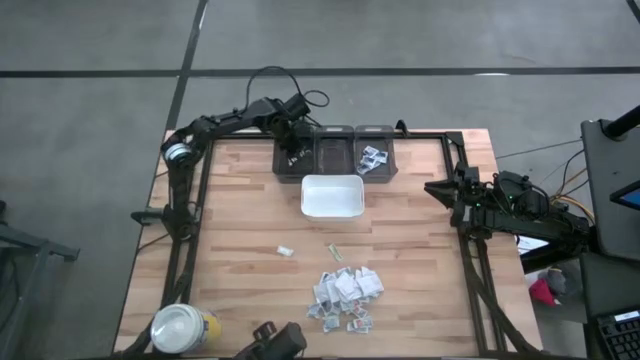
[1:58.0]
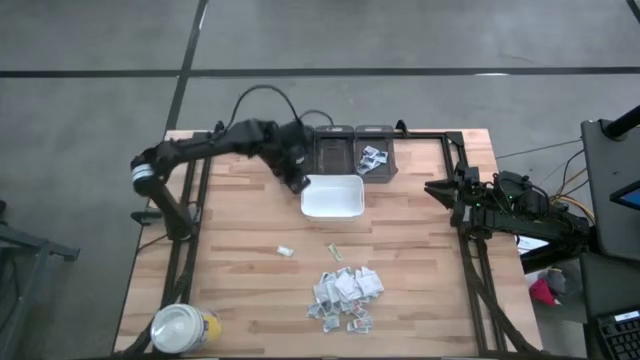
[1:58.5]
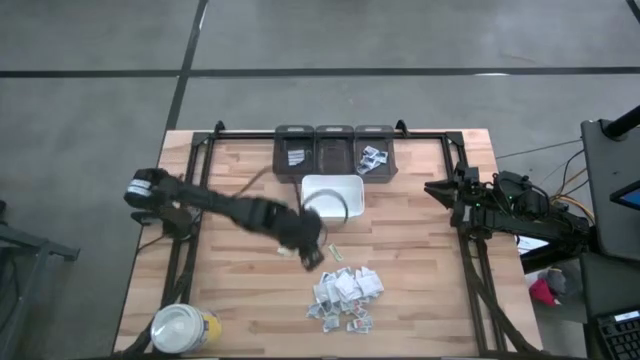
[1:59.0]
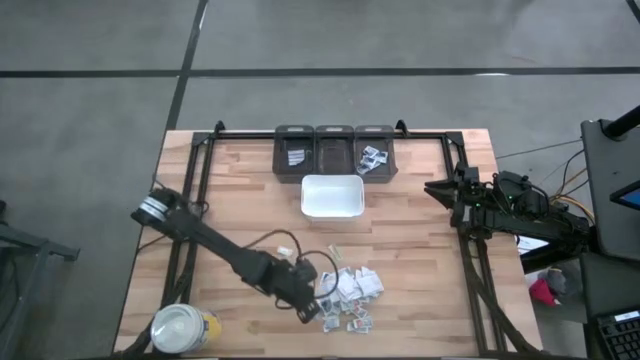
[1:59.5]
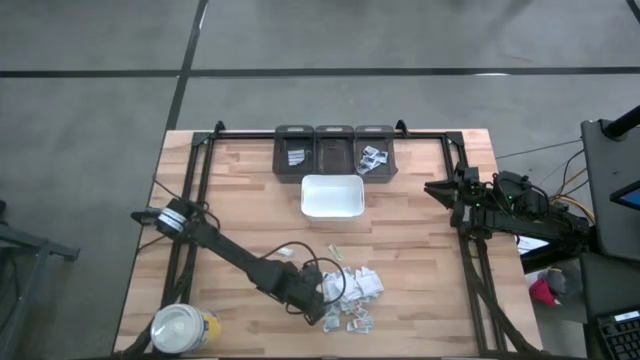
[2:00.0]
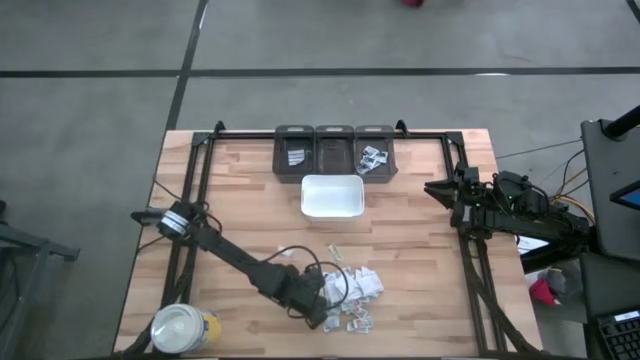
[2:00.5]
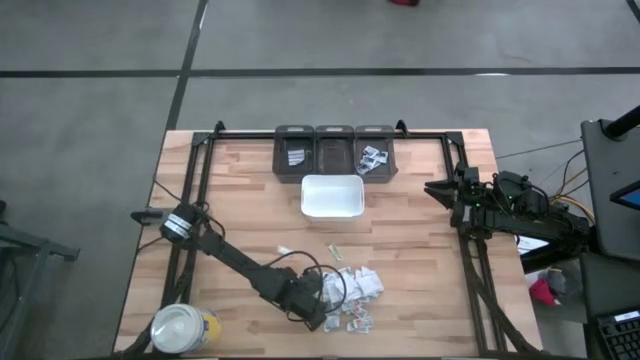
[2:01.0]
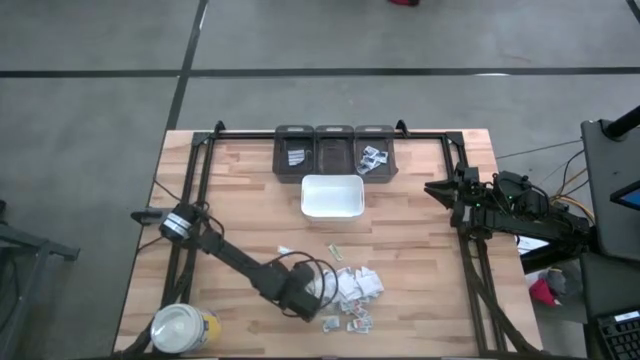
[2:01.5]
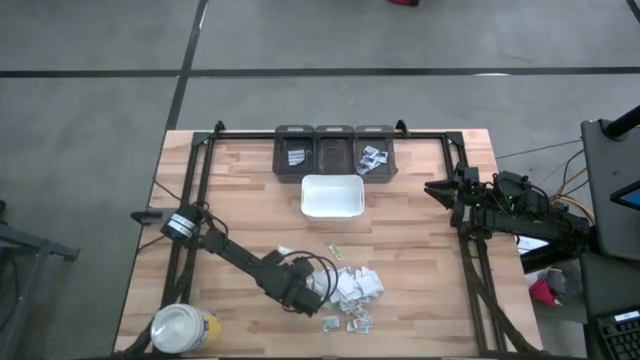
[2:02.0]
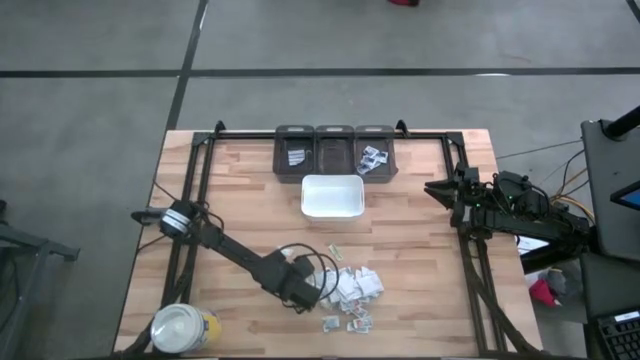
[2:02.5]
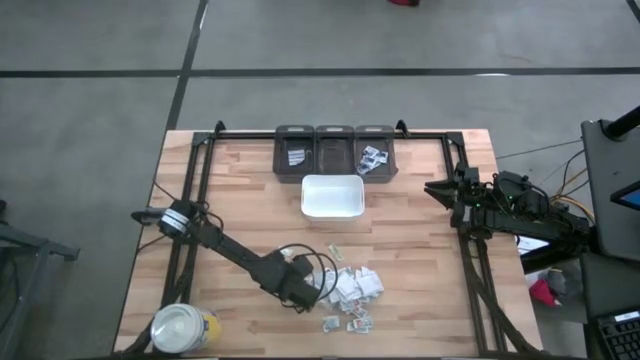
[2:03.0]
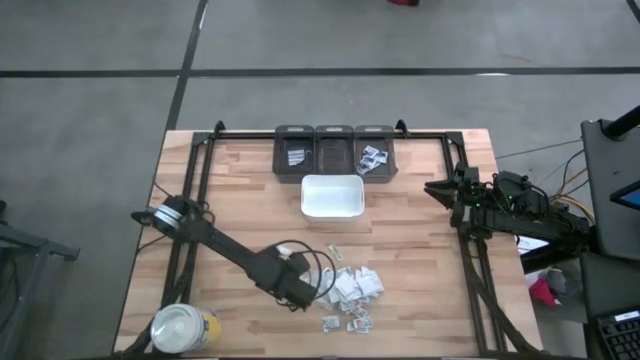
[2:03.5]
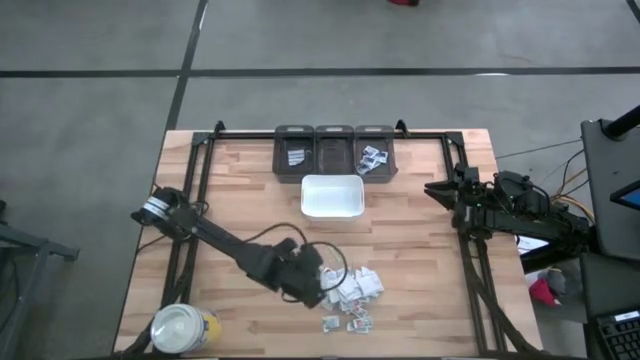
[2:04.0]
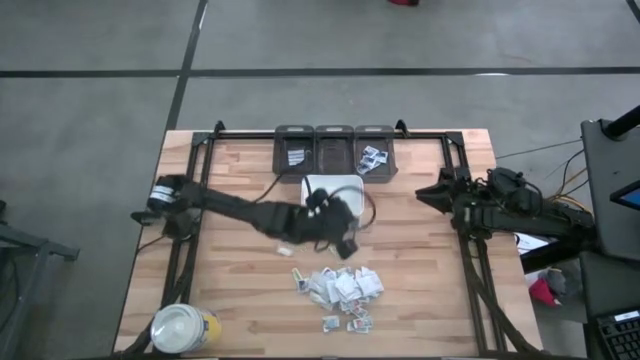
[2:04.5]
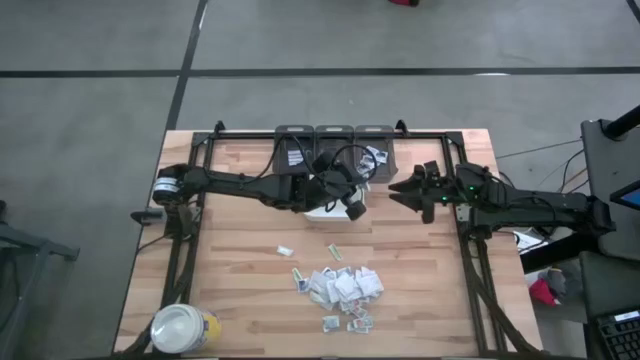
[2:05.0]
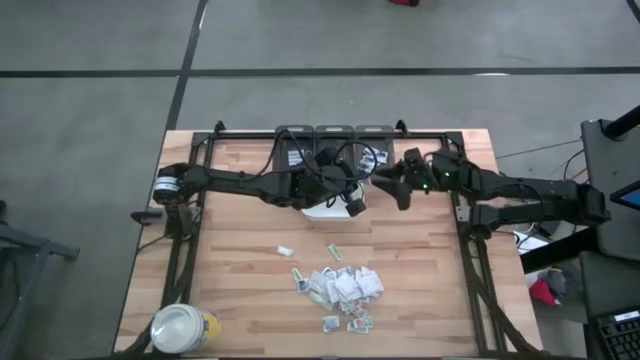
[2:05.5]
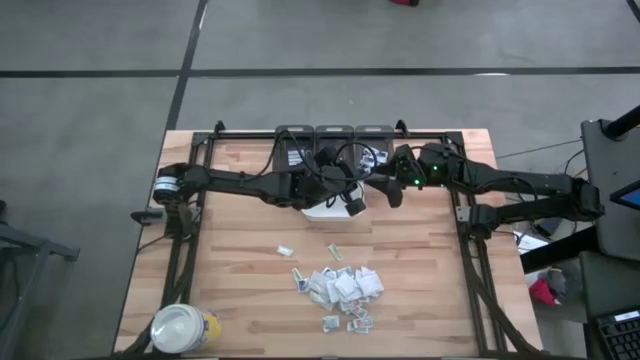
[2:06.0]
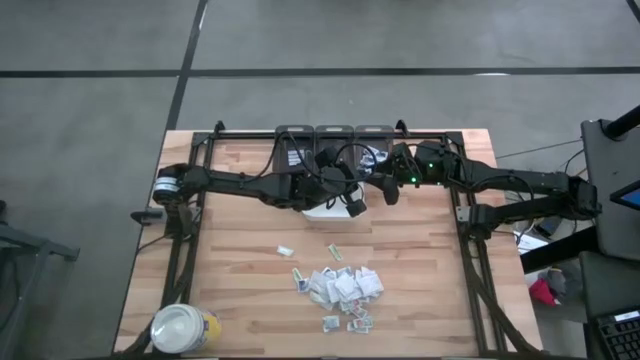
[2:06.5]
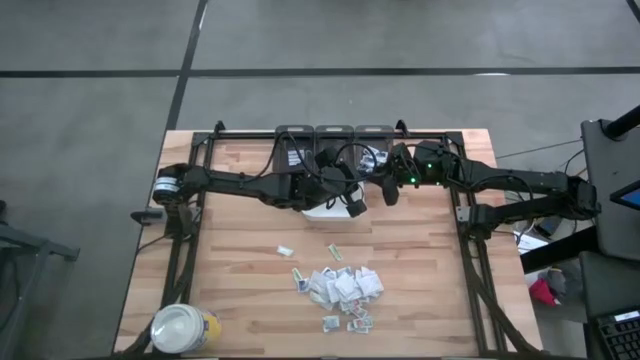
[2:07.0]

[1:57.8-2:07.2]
Task: Pick & Place First Aid Supplies
Put the white alcohol pad into the right black bin

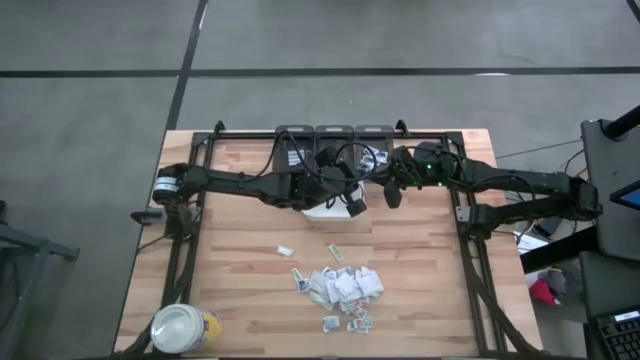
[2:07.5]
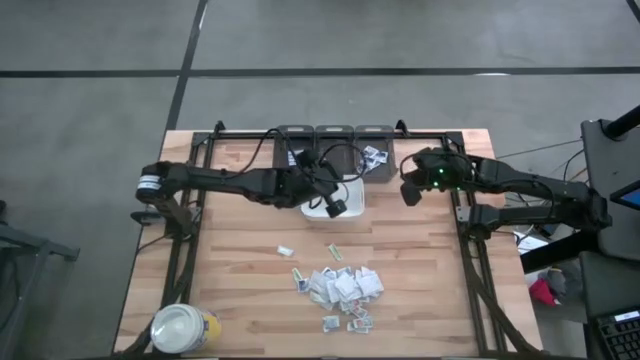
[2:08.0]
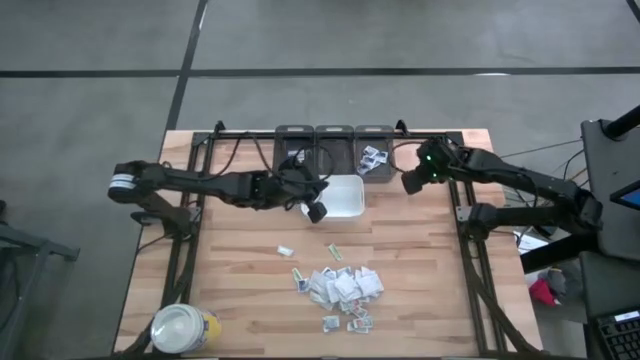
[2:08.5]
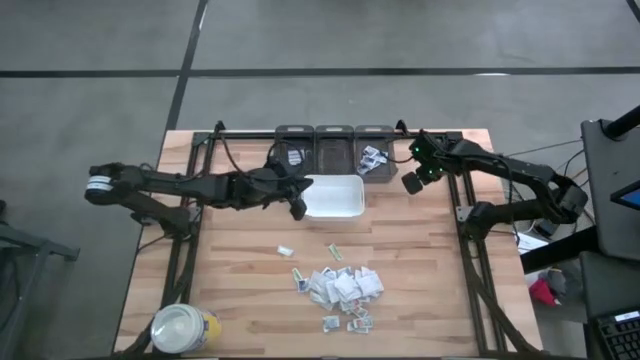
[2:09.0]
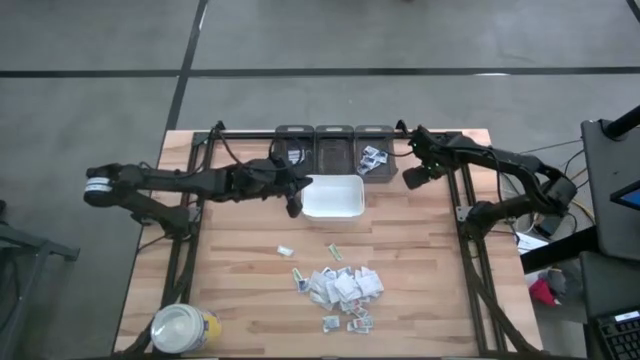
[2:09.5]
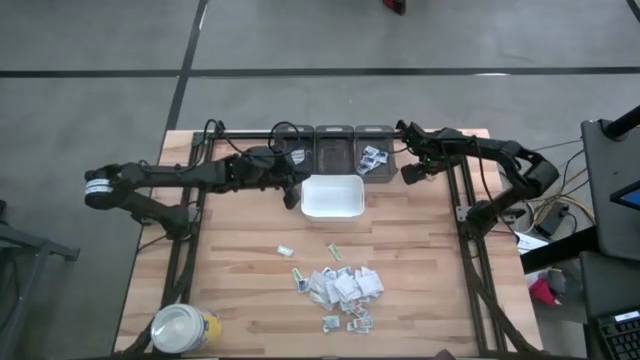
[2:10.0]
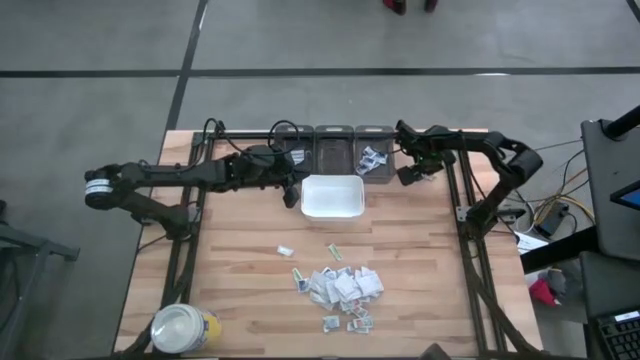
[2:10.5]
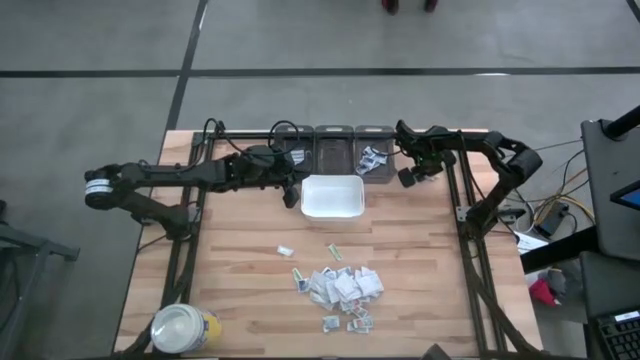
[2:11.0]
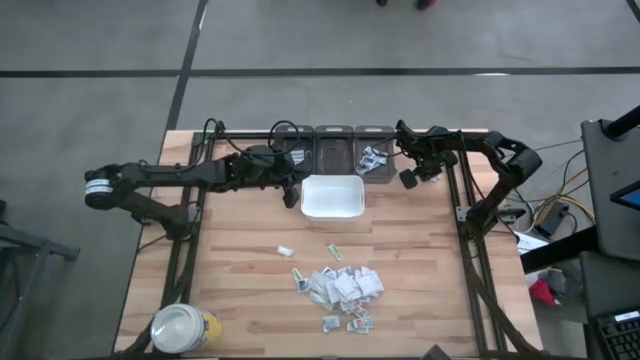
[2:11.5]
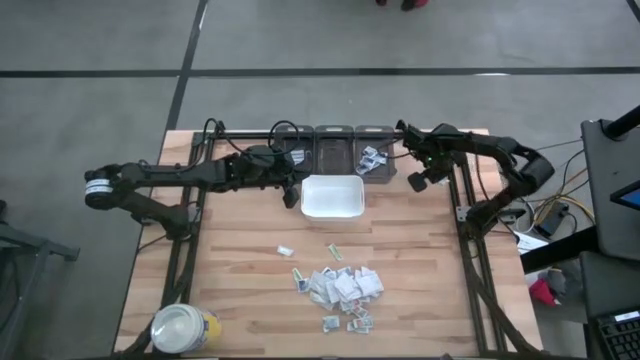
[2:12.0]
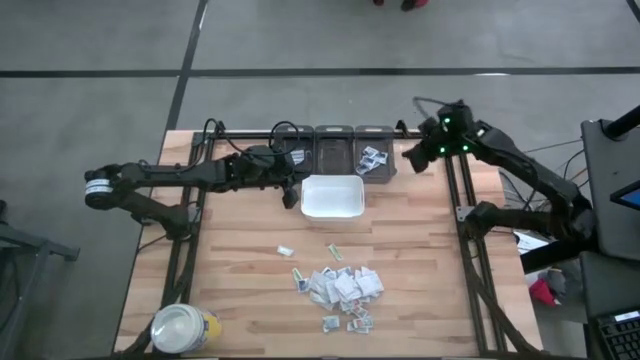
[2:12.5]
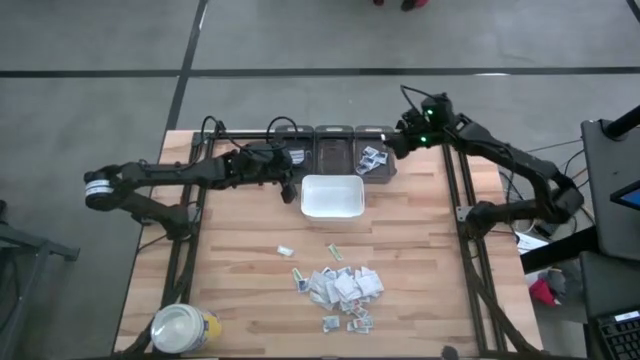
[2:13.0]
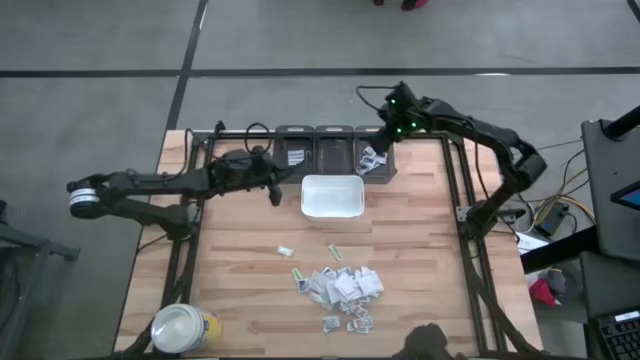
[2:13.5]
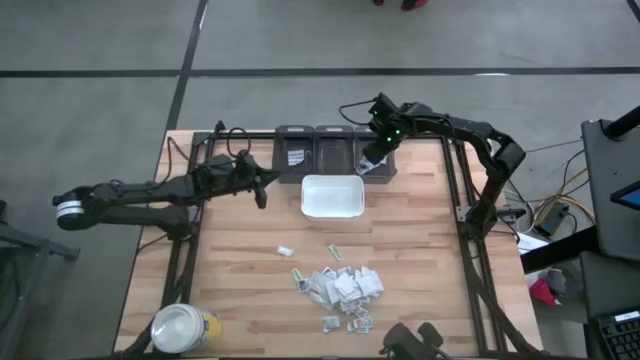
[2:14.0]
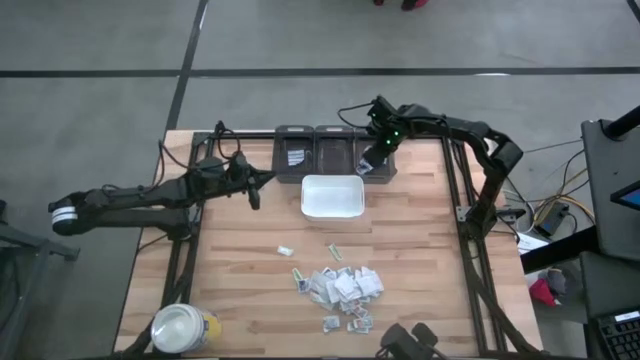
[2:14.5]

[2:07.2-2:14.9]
Put the white alcohol pad into the right black bin

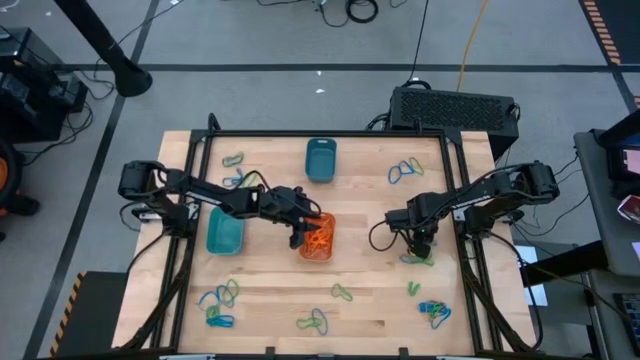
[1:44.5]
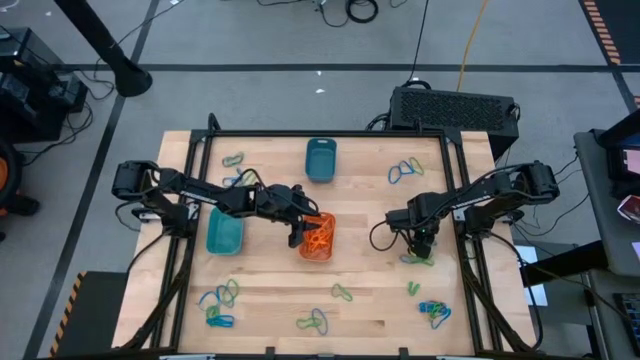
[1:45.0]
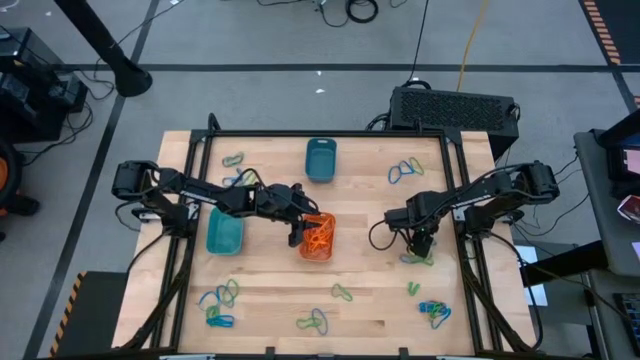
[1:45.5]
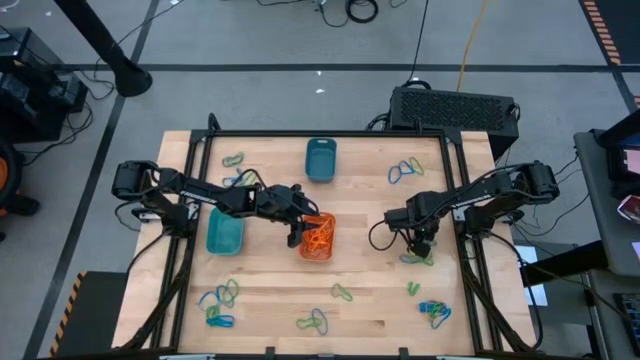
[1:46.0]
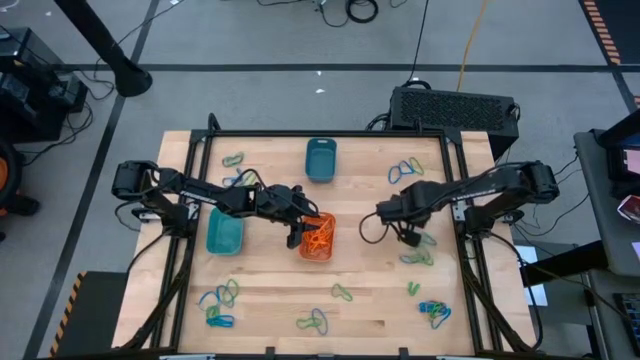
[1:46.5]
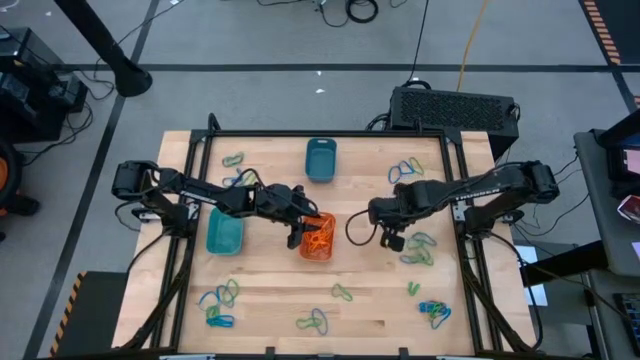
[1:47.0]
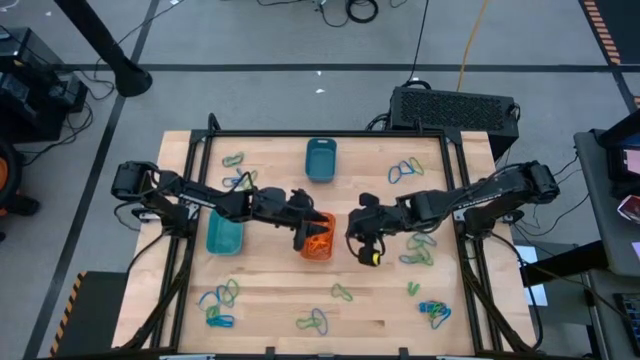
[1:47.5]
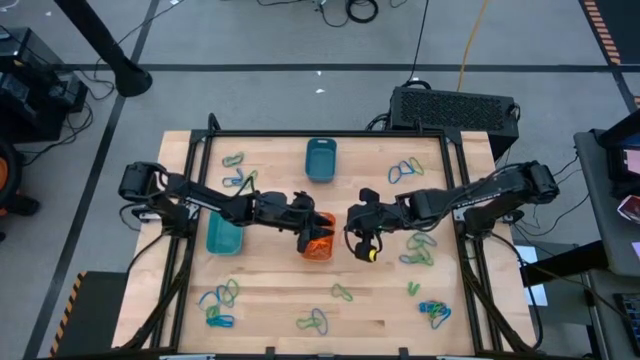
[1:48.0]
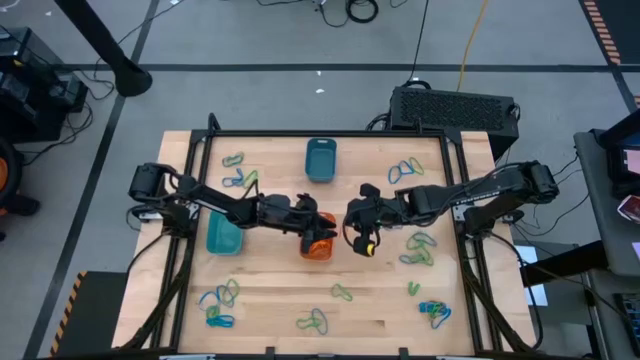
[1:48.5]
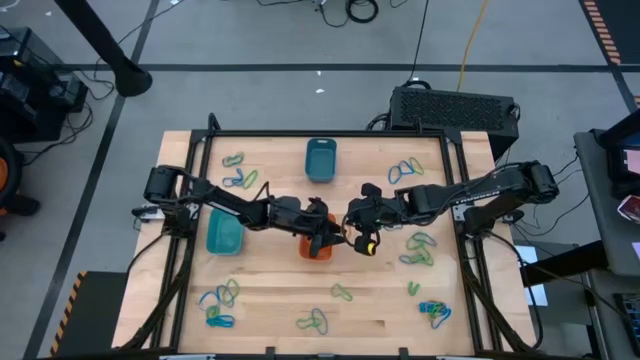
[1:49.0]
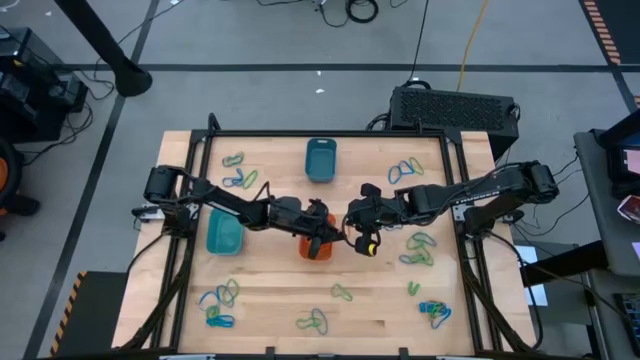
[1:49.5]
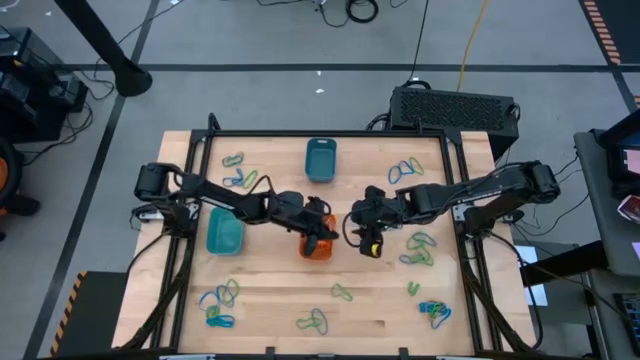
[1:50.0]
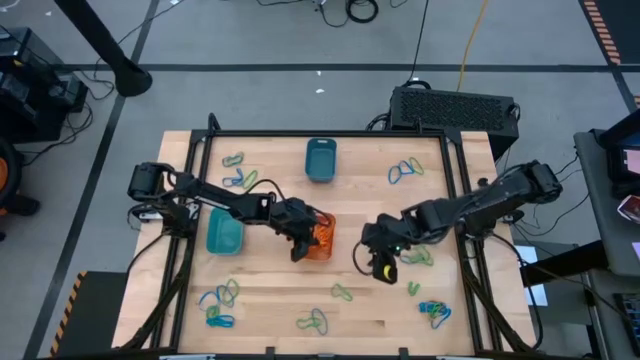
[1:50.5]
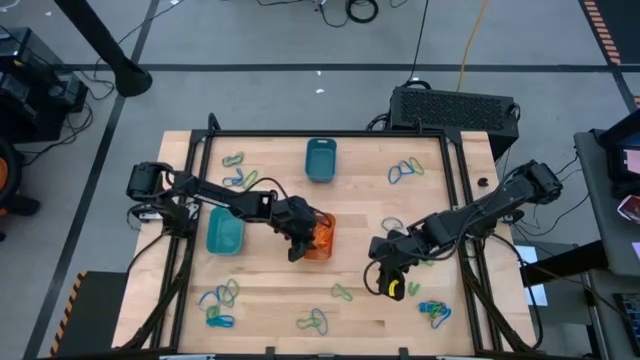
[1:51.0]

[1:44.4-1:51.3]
Task: Sort rubber bands into baskets
Put the orange rubber band into the orange bin
